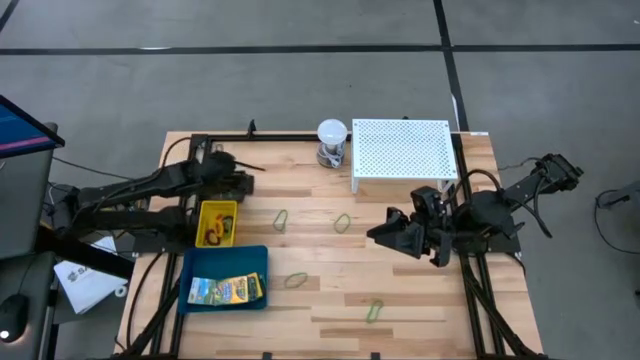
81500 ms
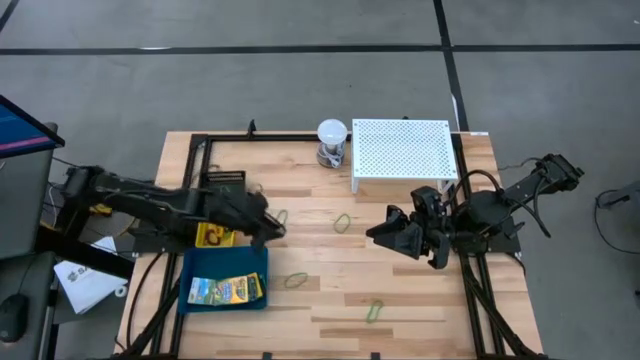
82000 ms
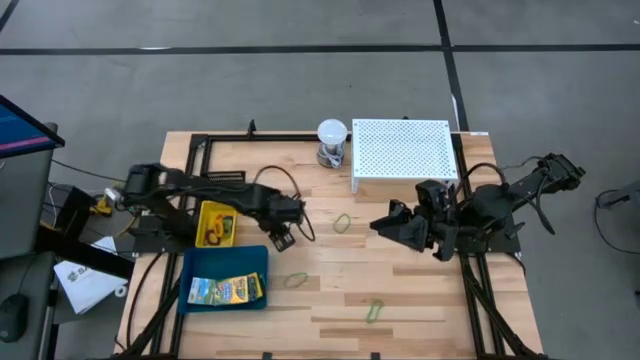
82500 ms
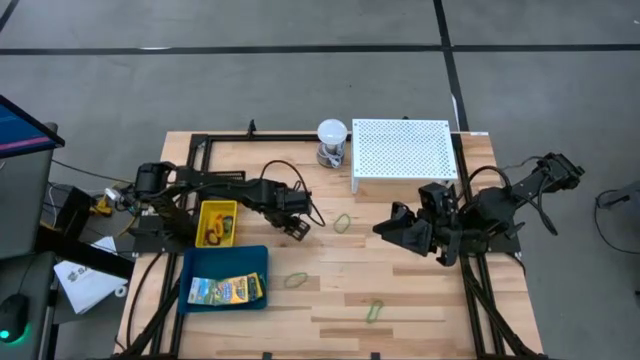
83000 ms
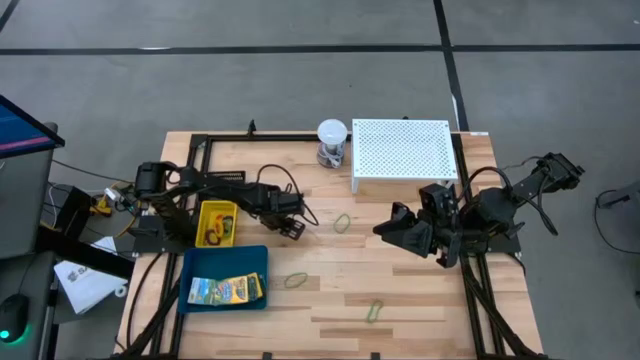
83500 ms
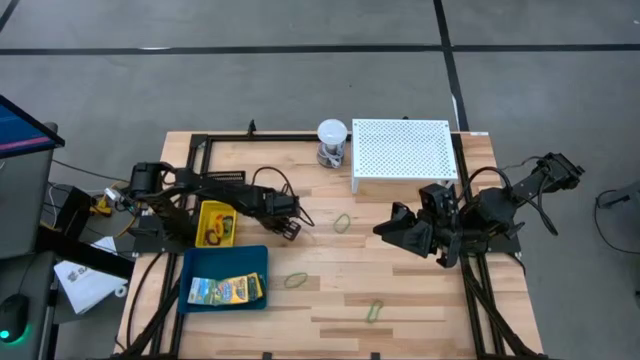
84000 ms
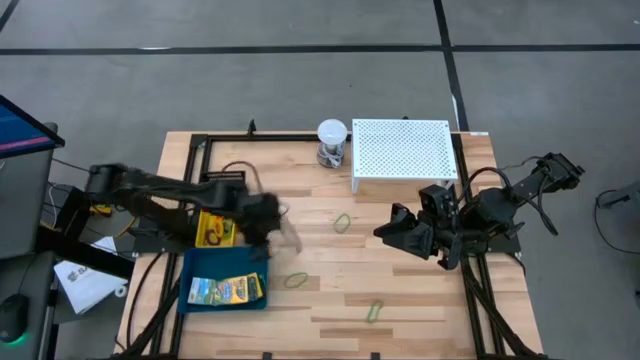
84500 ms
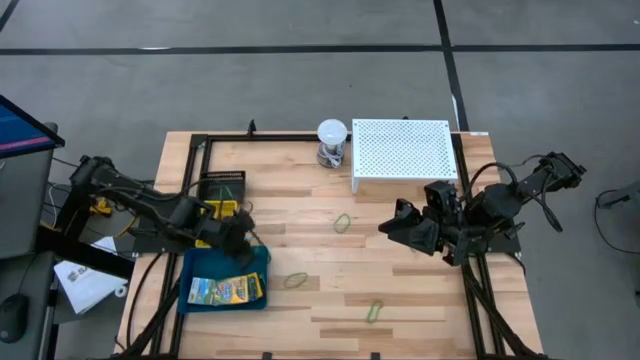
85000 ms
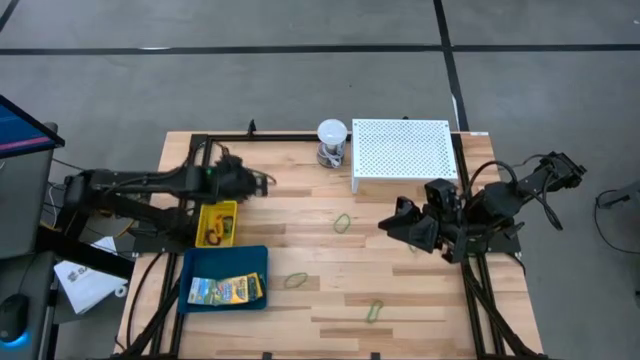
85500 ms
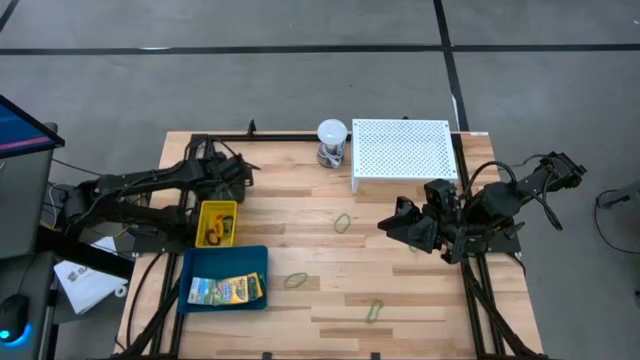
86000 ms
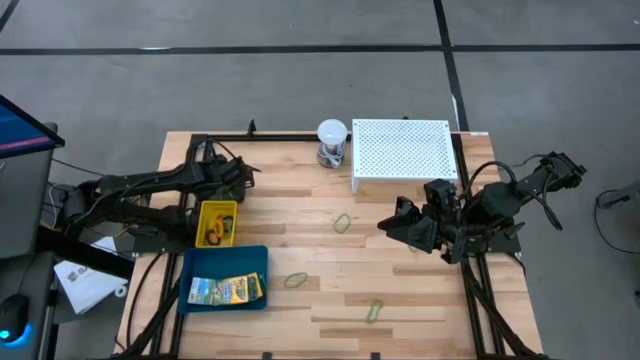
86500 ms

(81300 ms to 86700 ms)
Task: Pick & Place Office Desk Supplies
Put the rubber band into the black bin

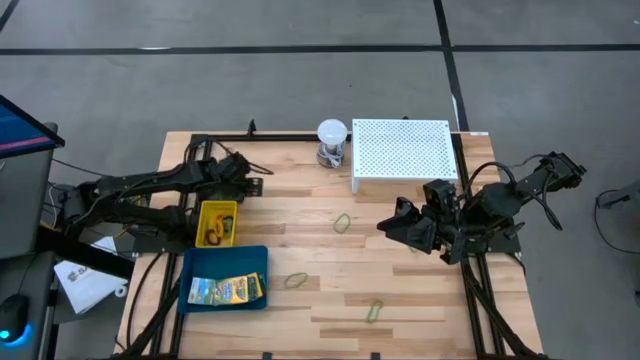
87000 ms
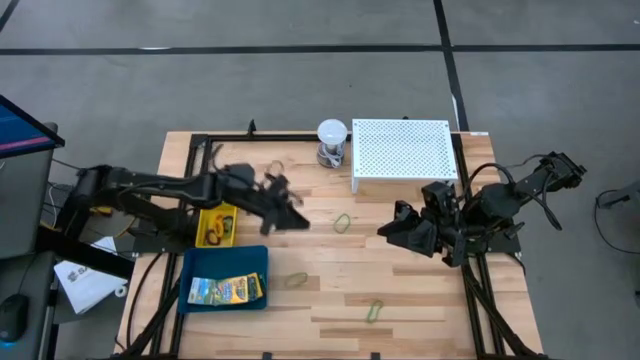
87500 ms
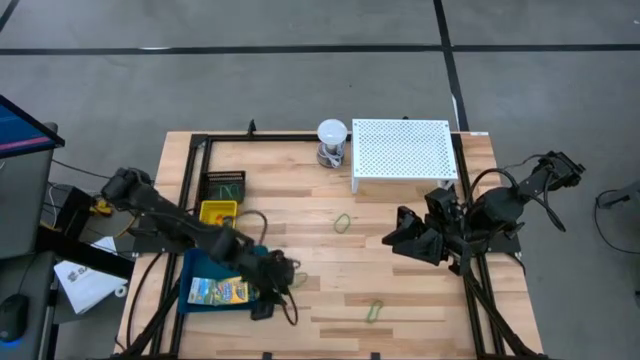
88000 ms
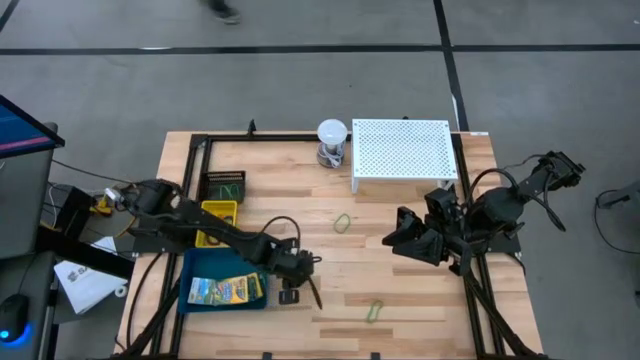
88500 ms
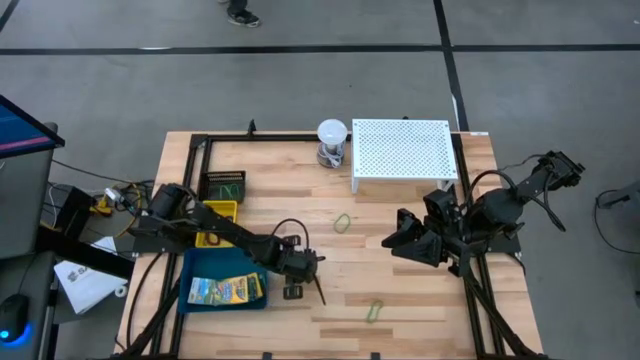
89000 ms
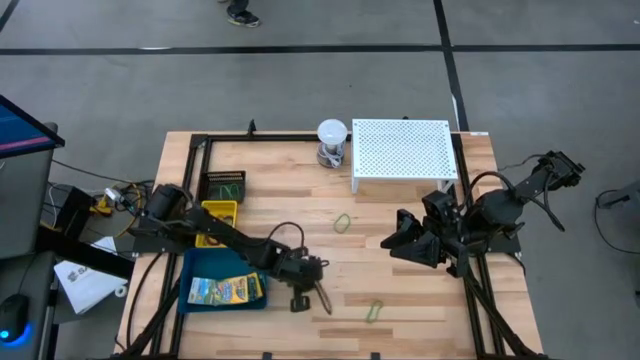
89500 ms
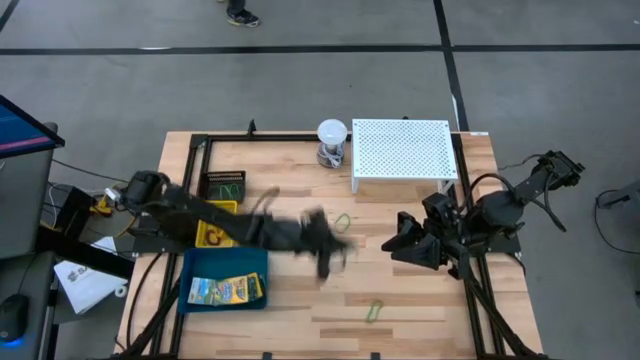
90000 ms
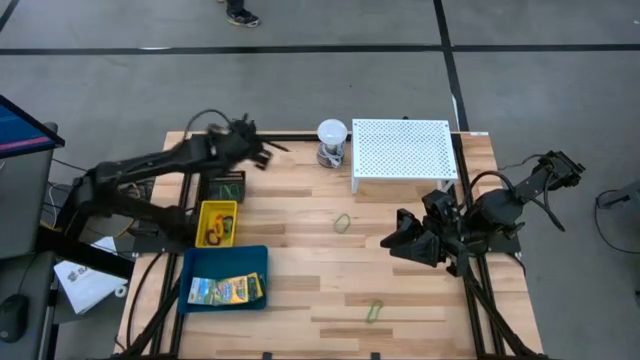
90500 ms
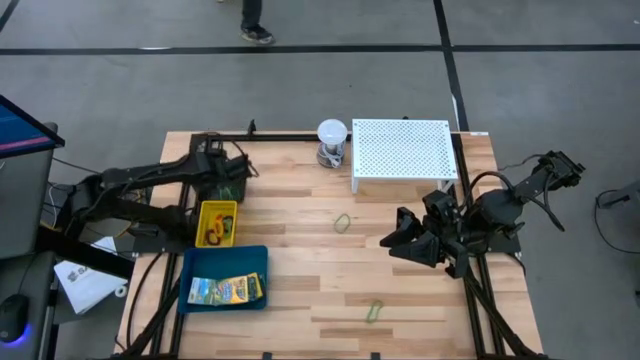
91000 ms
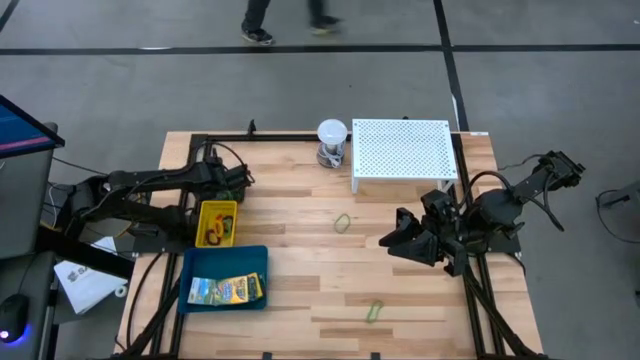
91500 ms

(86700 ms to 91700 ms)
Put the rubber band into the black bin

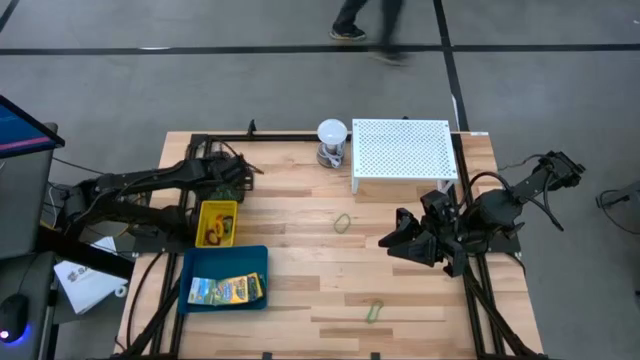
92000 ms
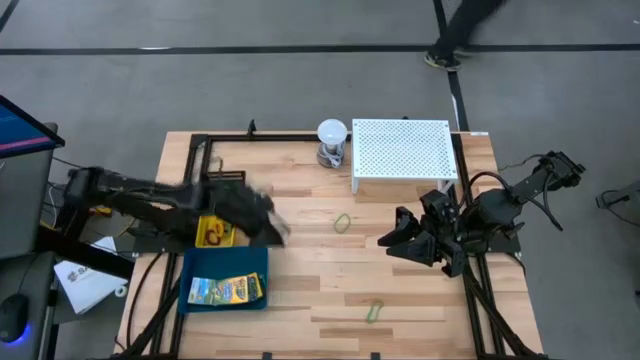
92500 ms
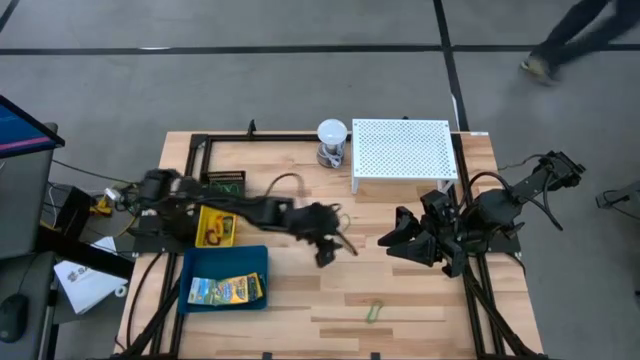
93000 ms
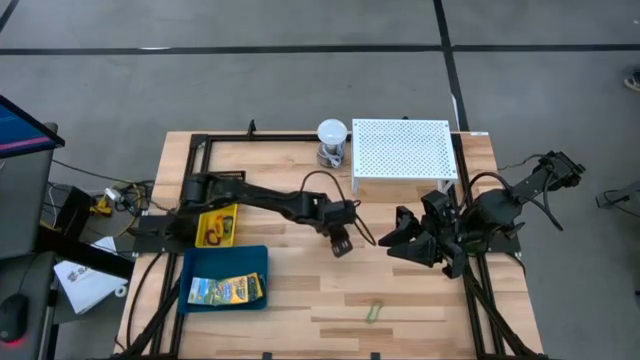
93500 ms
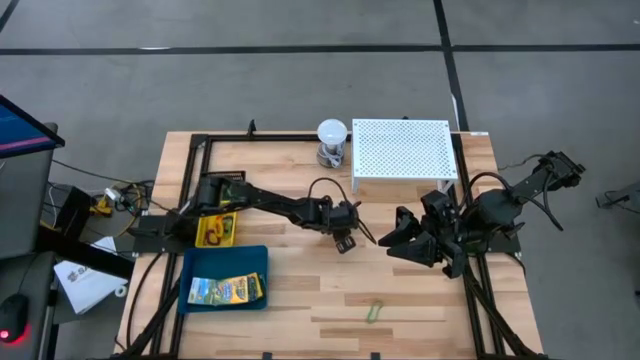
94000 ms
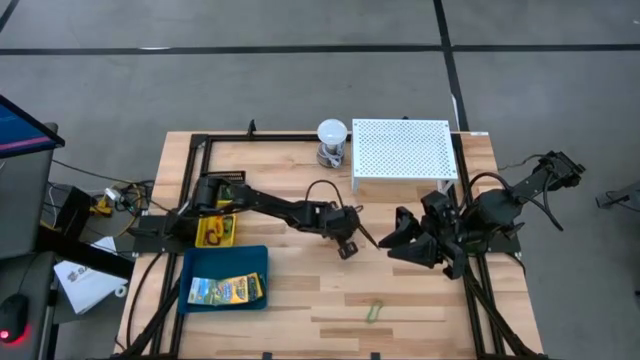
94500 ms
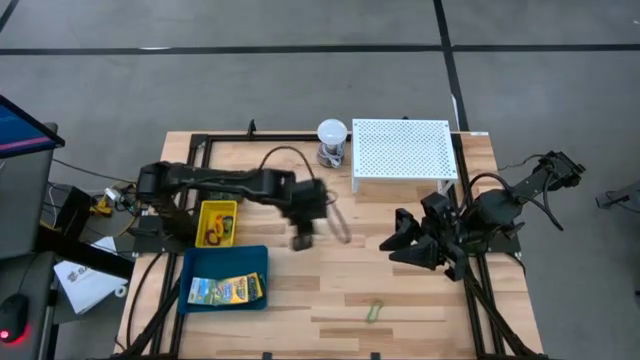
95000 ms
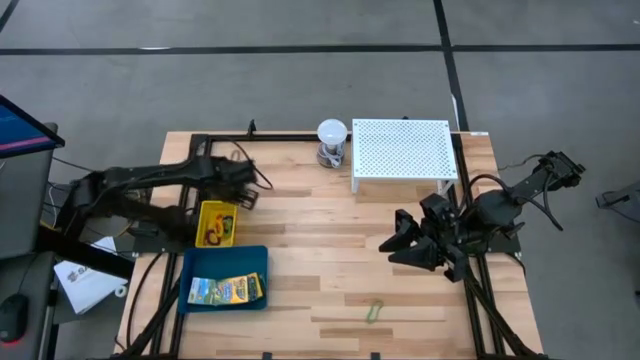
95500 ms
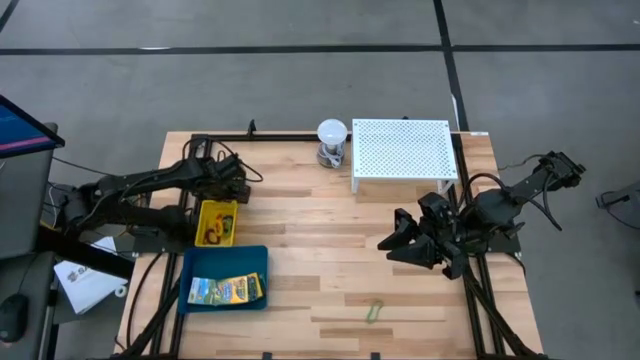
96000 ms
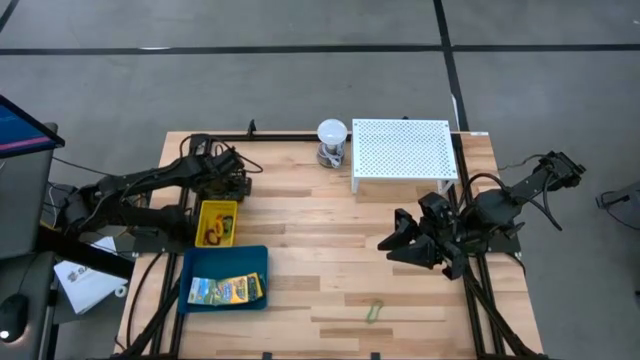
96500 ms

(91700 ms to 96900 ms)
Put the top rubber band into the black bin

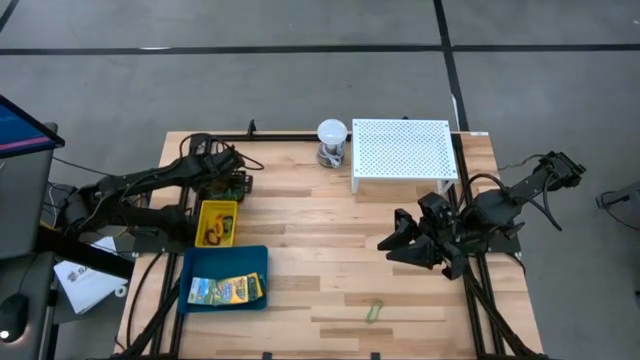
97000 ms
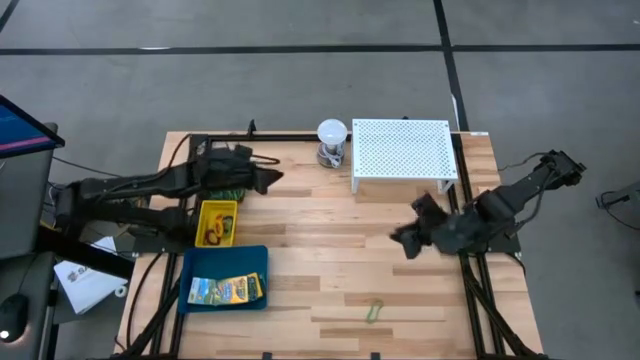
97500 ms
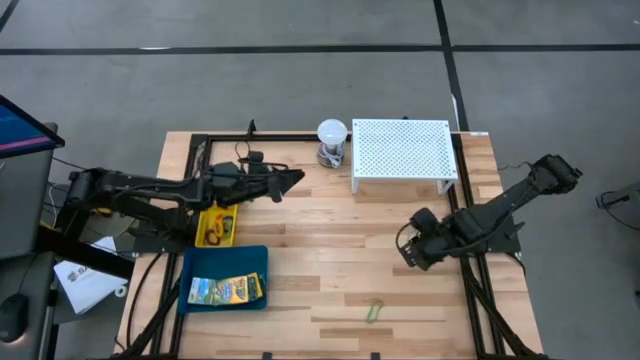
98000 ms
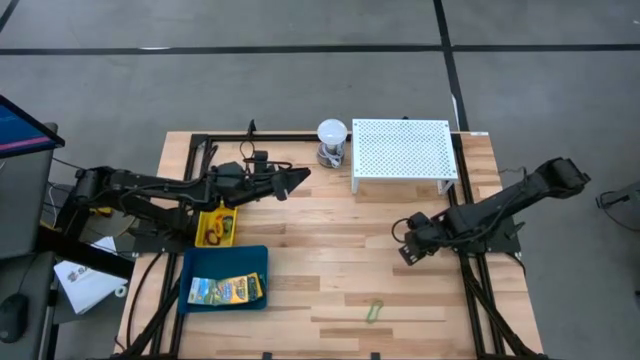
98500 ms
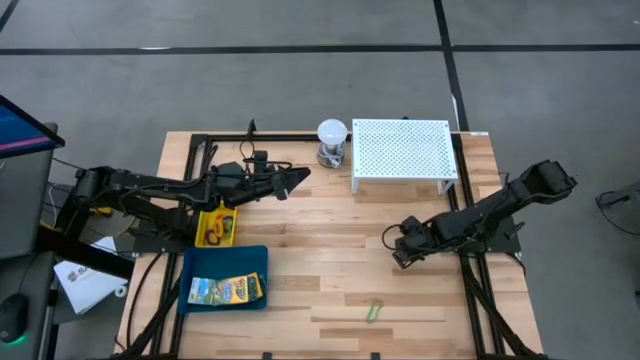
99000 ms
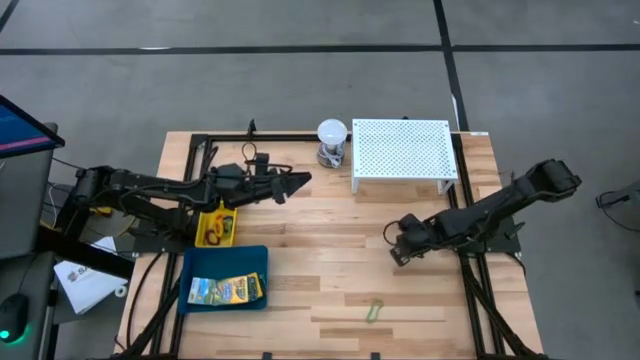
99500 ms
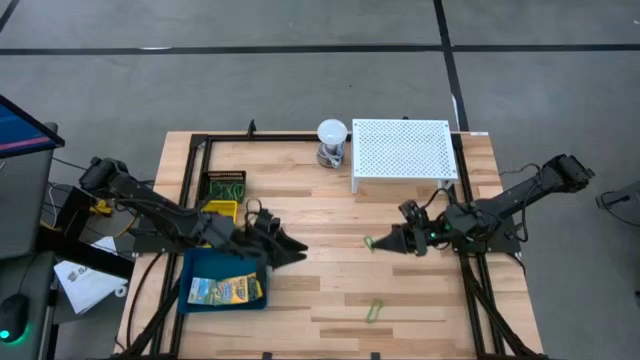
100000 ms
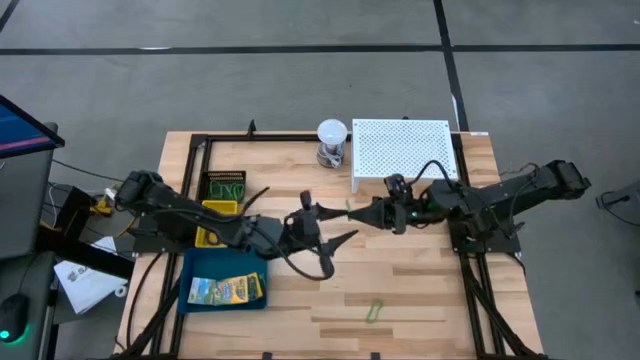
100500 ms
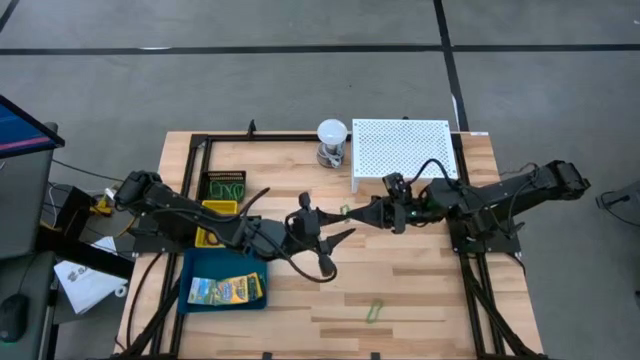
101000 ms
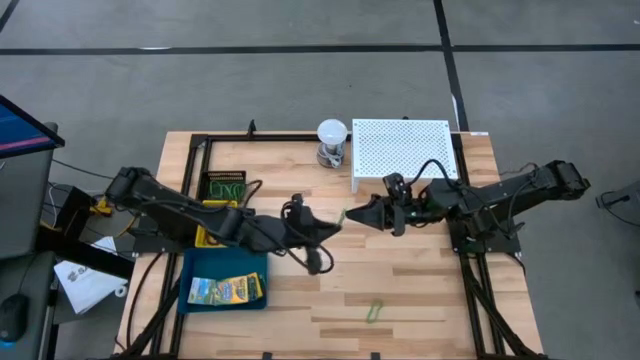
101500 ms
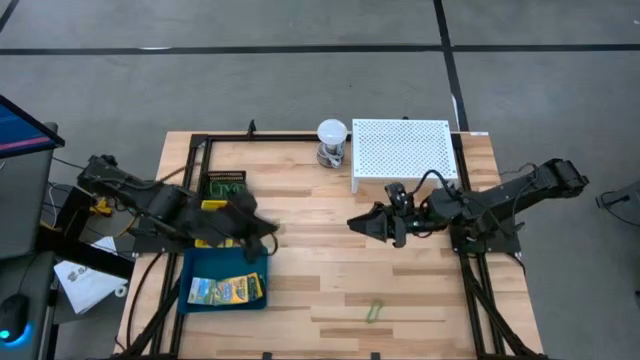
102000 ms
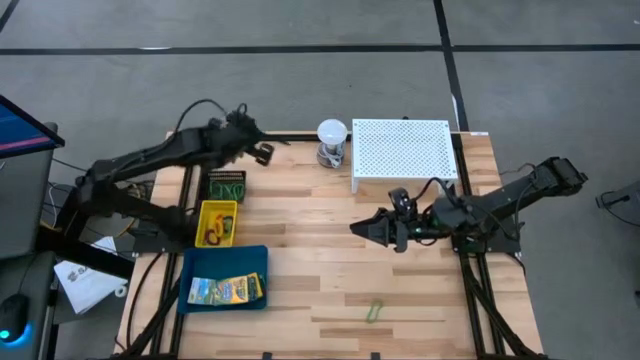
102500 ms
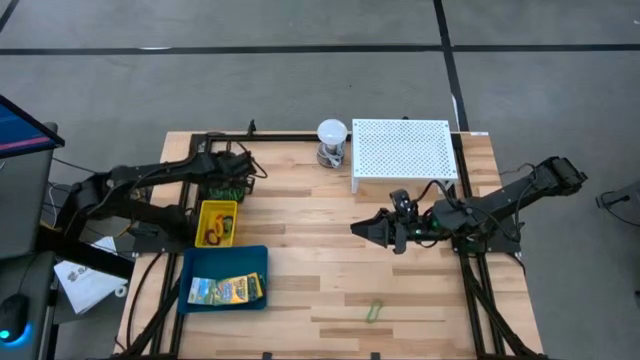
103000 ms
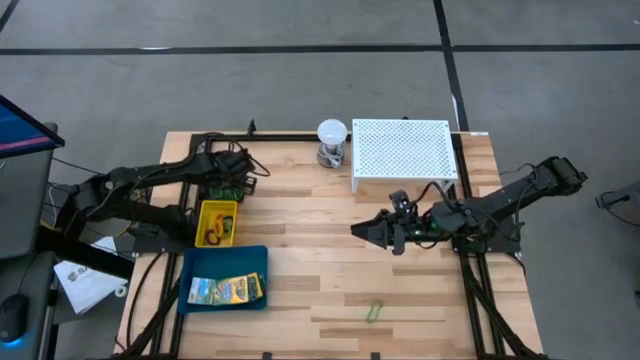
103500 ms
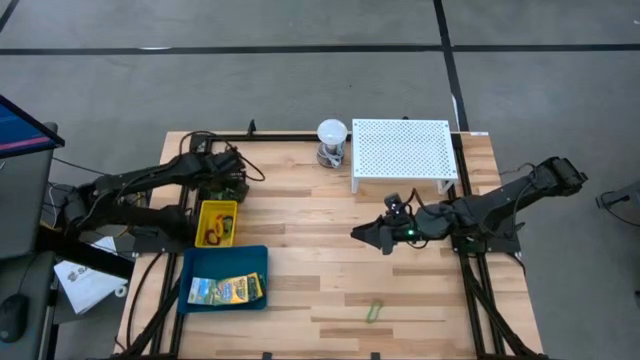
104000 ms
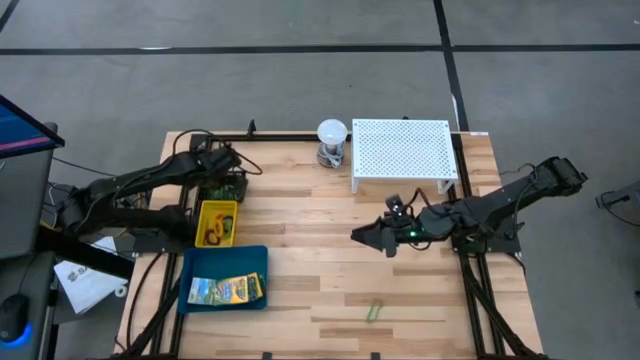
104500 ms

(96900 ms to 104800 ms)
Put the top rubber band into the black bin
